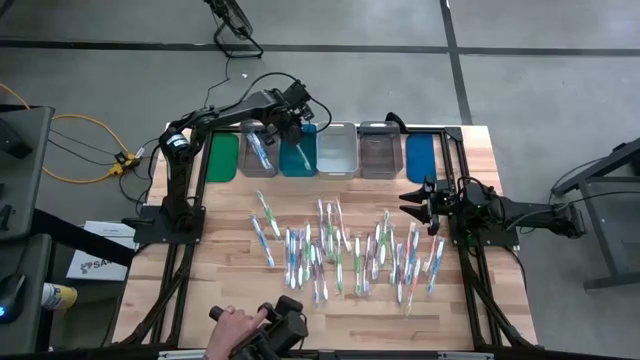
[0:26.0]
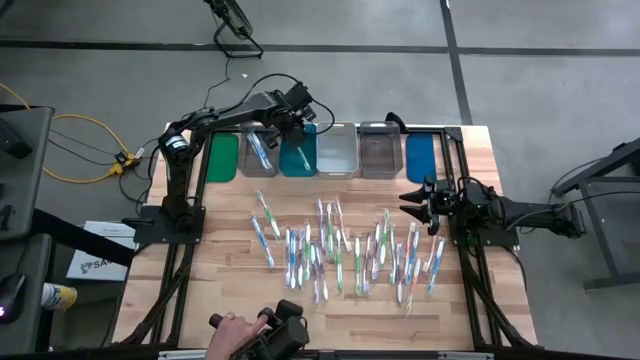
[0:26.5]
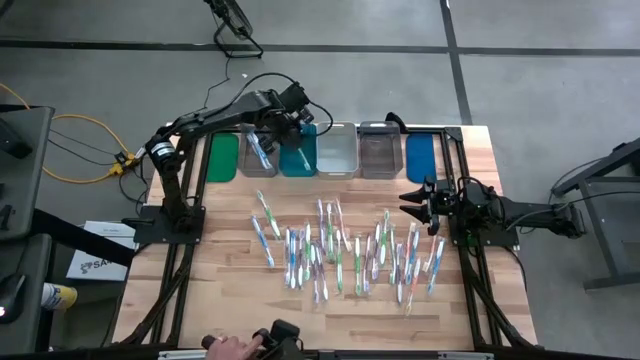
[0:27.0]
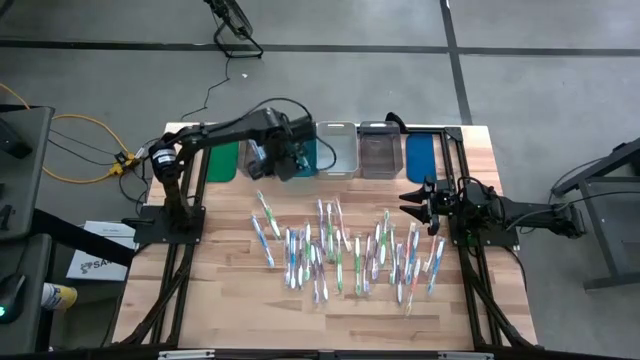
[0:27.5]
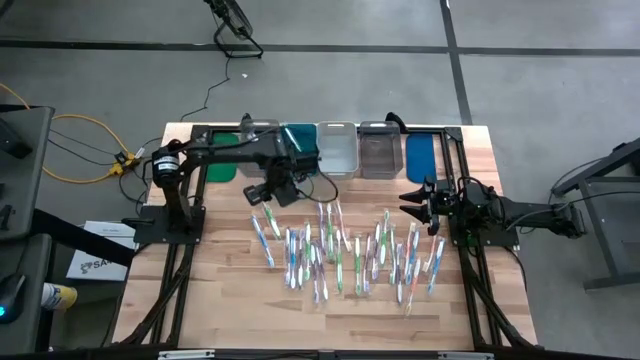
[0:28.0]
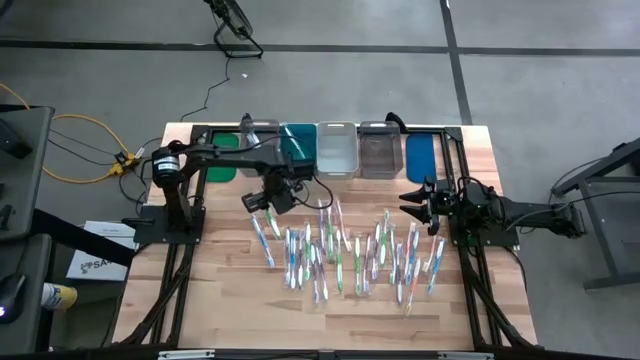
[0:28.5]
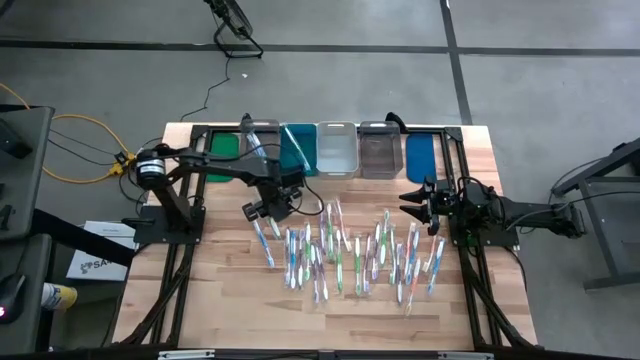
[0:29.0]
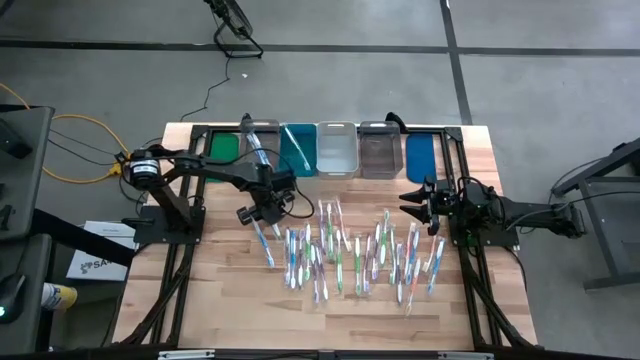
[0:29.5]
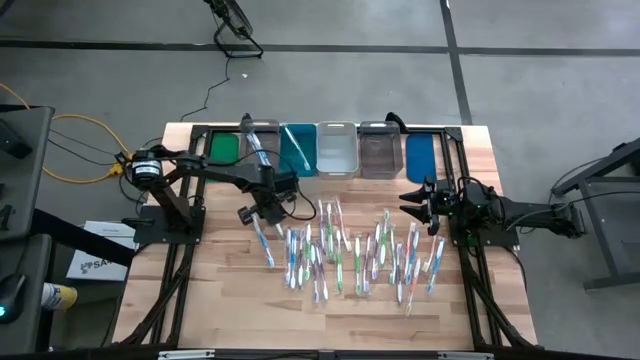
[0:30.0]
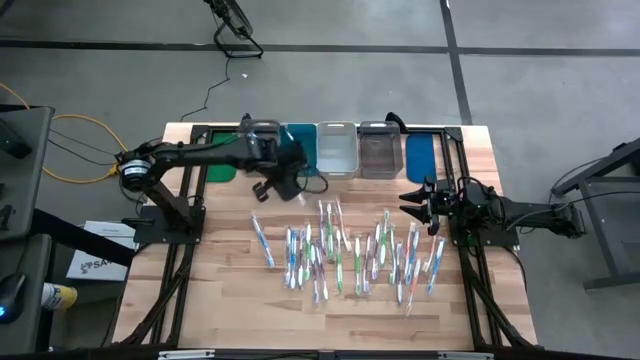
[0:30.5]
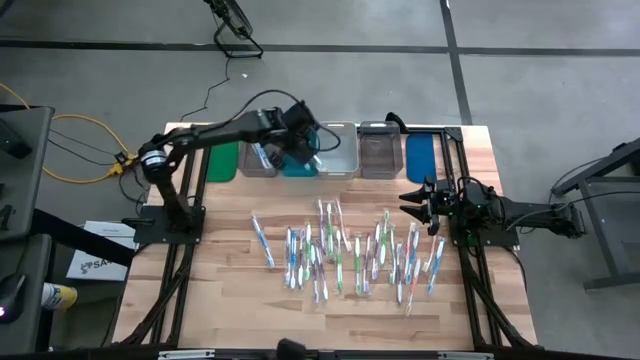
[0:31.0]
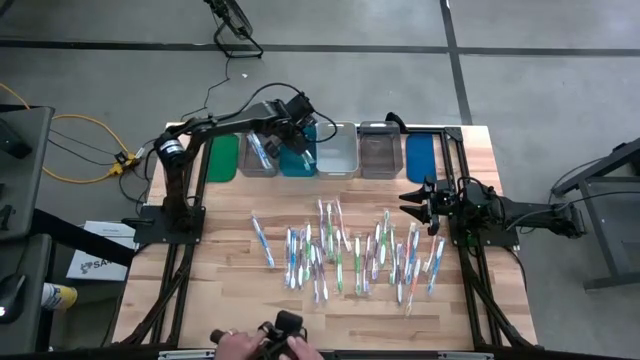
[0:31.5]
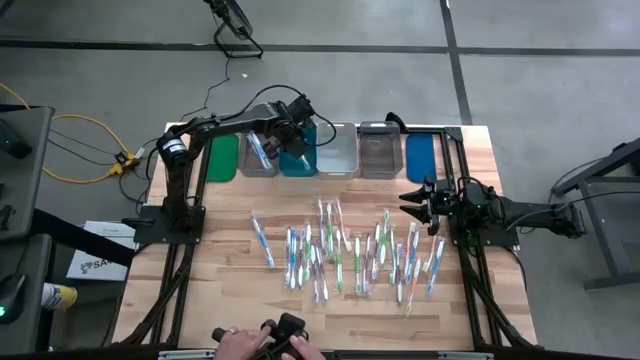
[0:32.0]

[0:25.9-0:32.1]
Task: Pick & Place Toothbrushes
Put the green toothbrush into the blue bin

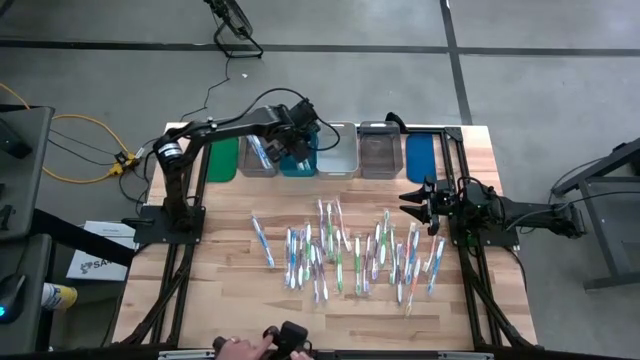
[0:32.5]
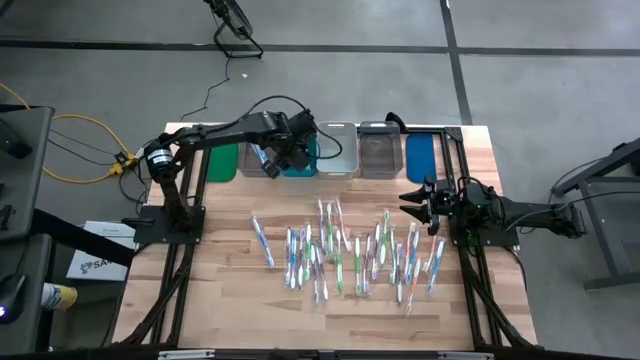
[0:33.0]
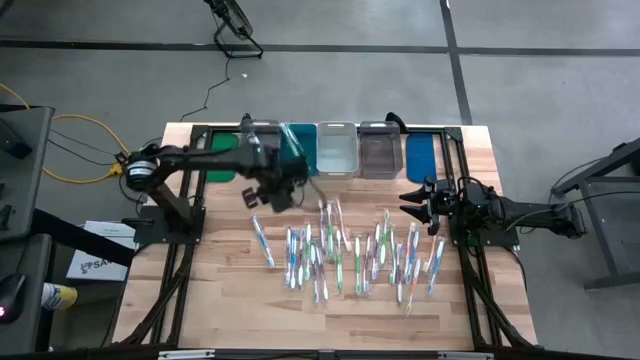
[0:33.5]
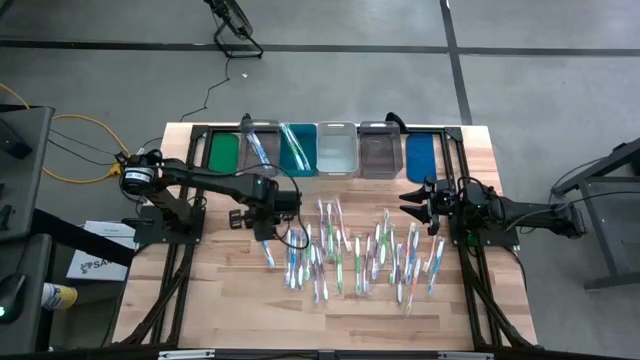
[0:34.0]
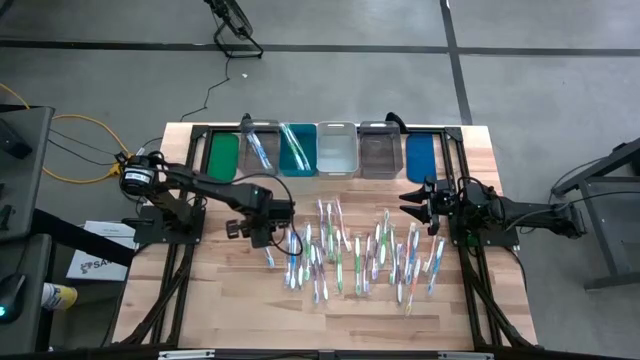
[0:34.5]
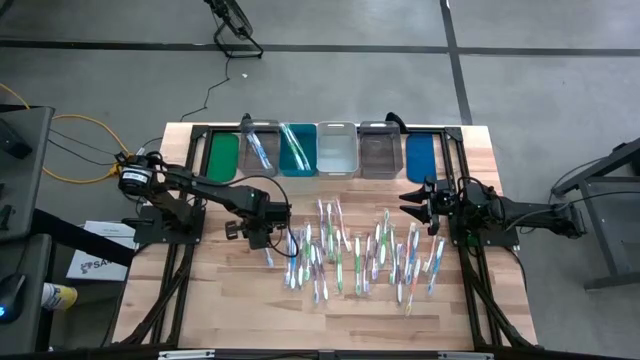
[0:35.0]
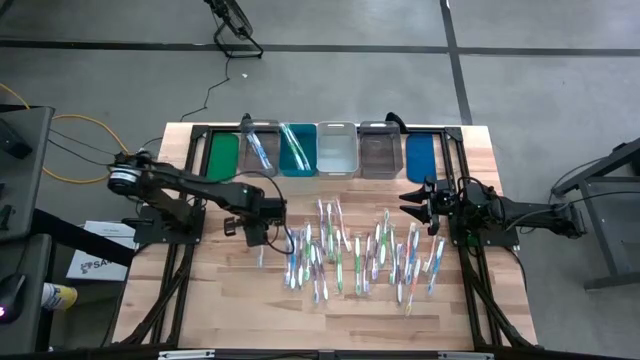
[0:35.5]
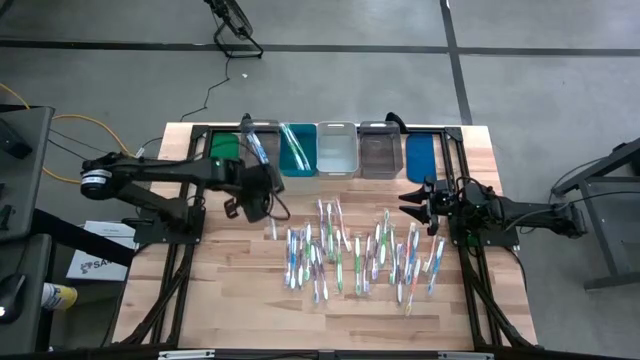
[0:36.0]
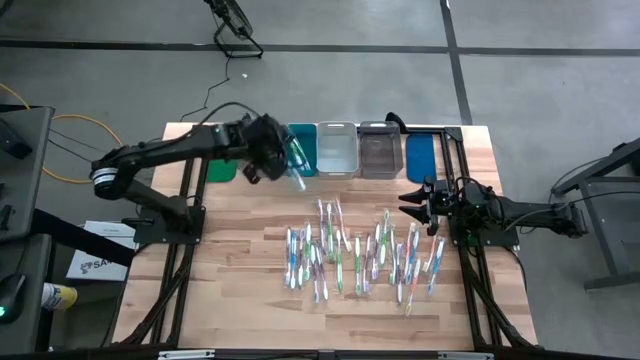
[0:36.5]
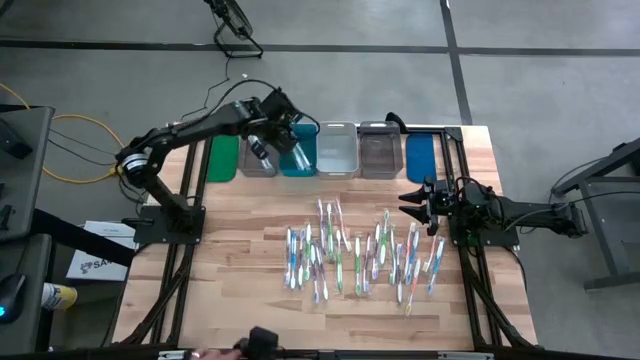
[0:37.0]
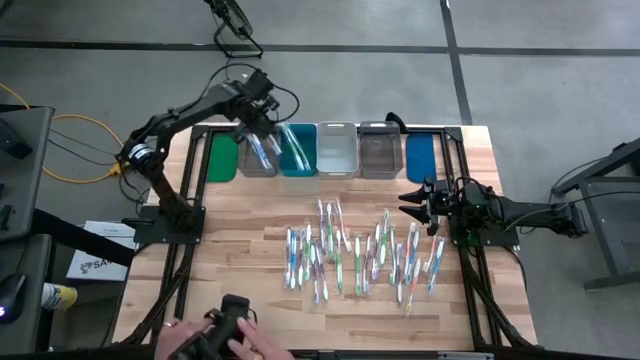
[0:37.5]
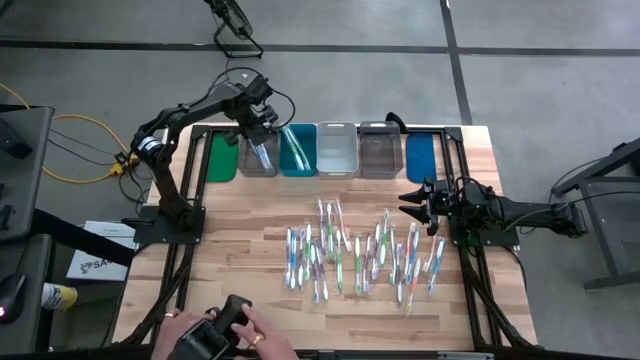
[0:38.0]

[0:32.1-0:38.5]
Put the blue toothbrush into the left black bin

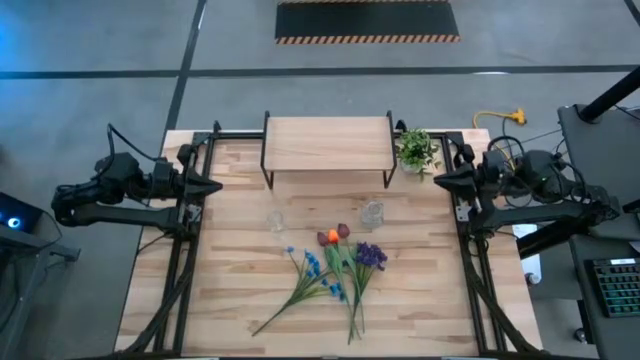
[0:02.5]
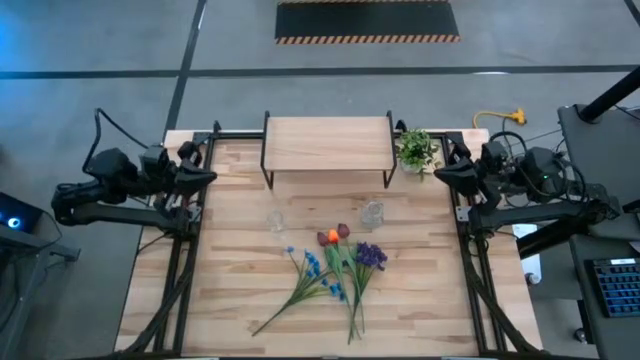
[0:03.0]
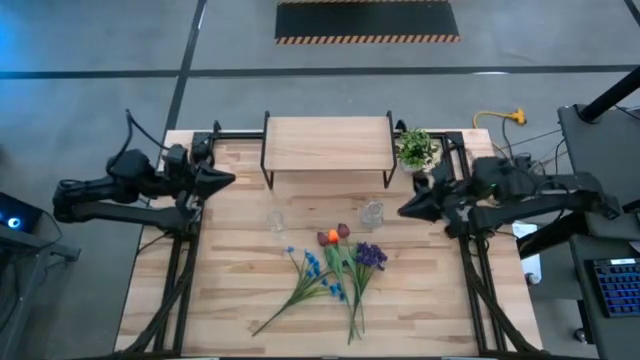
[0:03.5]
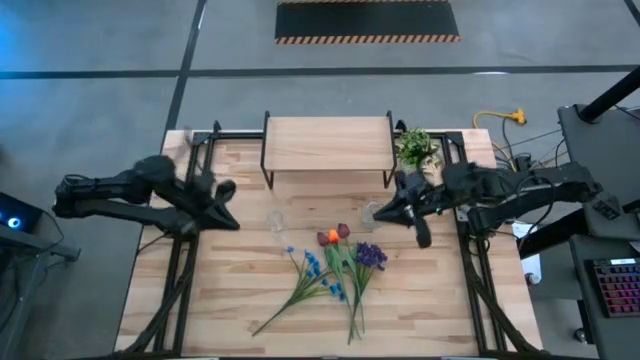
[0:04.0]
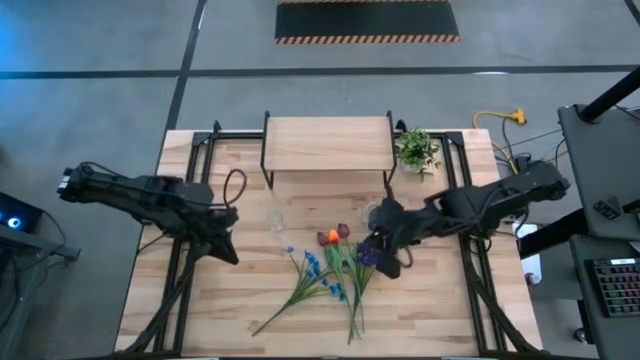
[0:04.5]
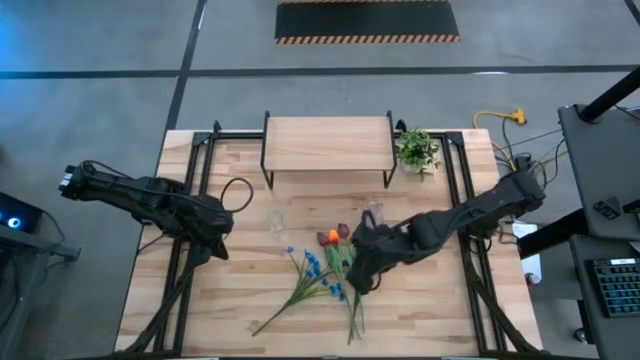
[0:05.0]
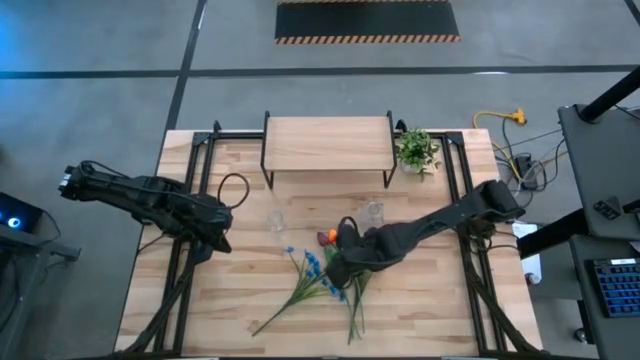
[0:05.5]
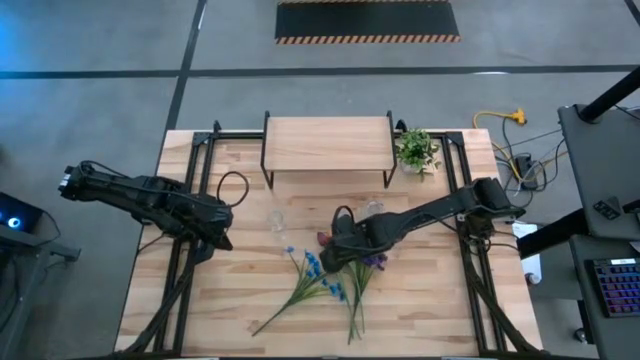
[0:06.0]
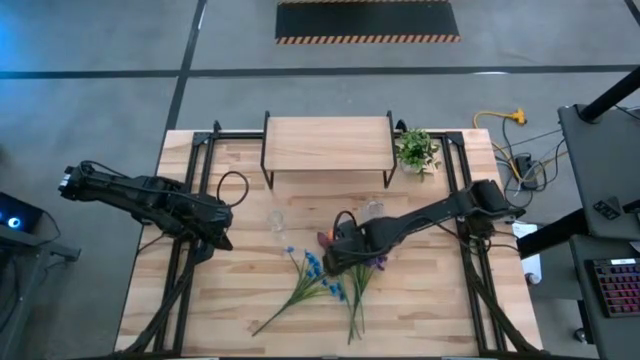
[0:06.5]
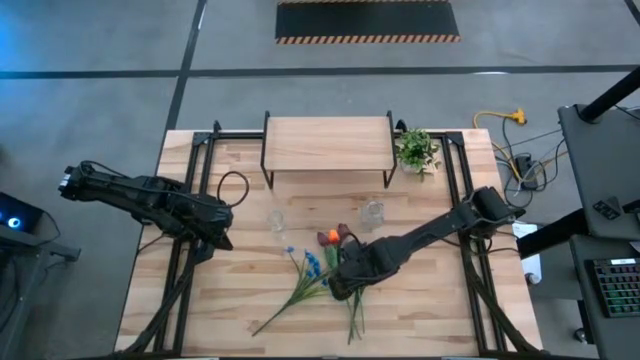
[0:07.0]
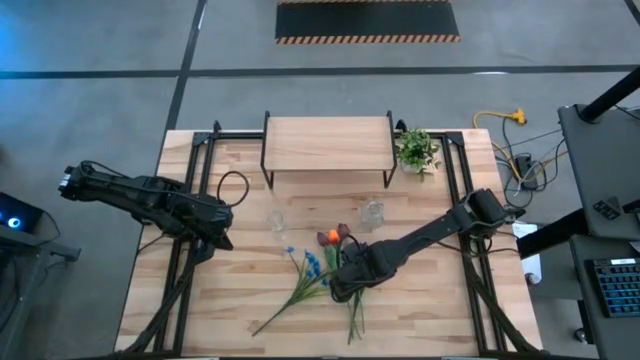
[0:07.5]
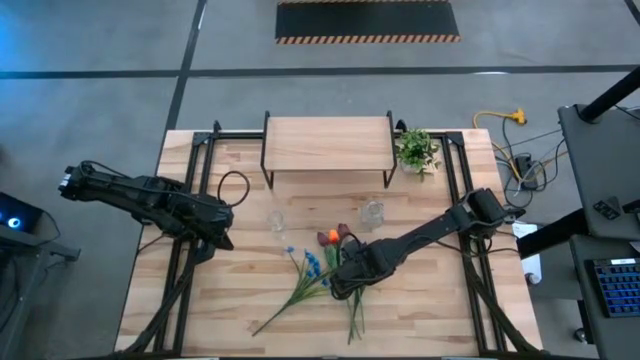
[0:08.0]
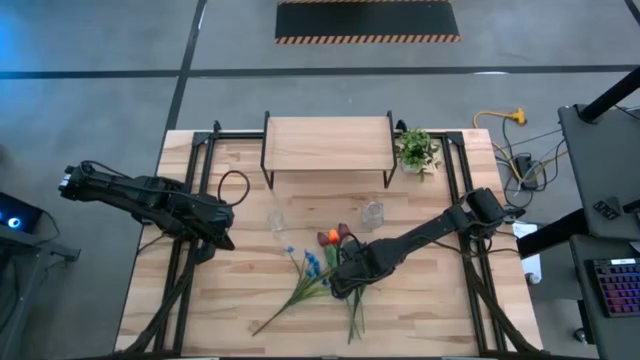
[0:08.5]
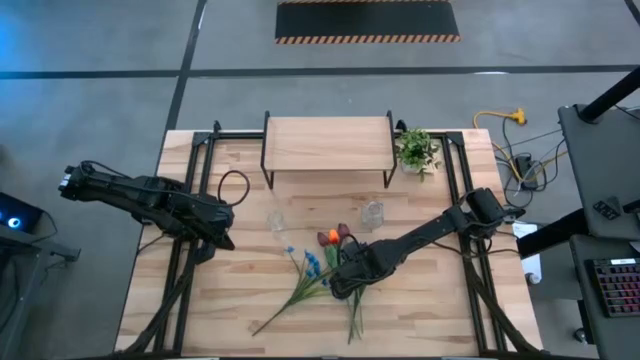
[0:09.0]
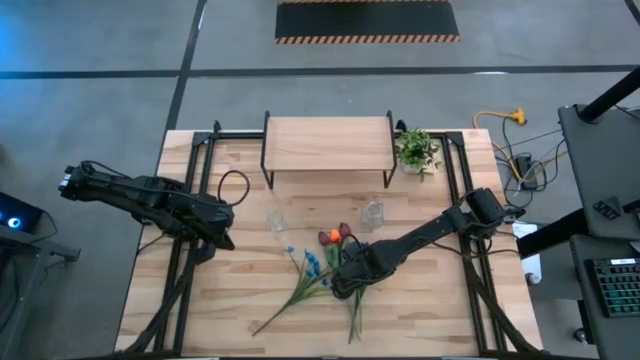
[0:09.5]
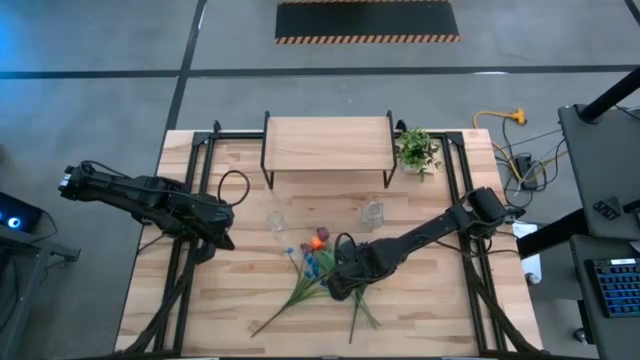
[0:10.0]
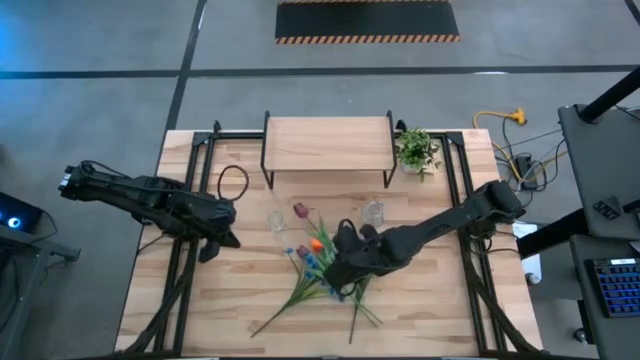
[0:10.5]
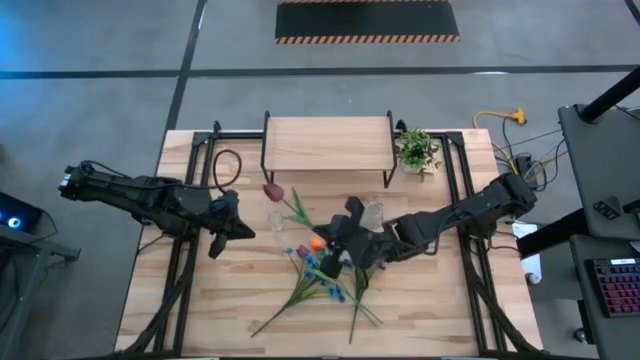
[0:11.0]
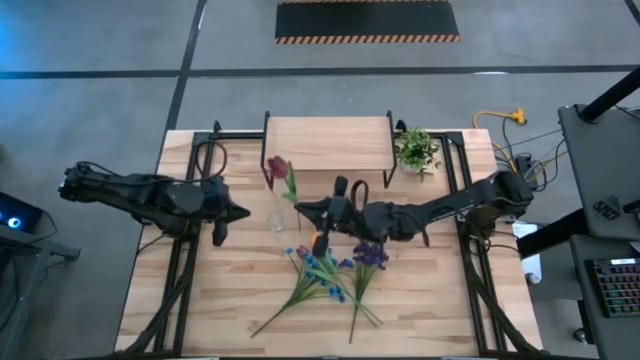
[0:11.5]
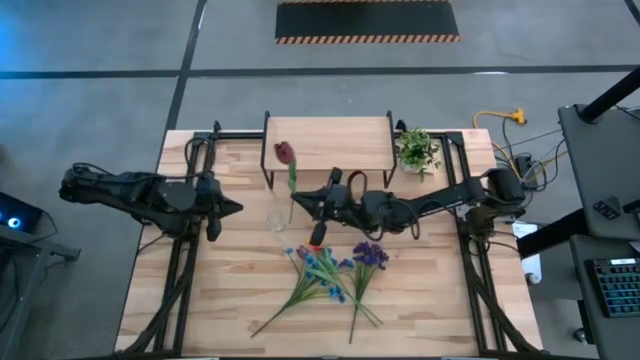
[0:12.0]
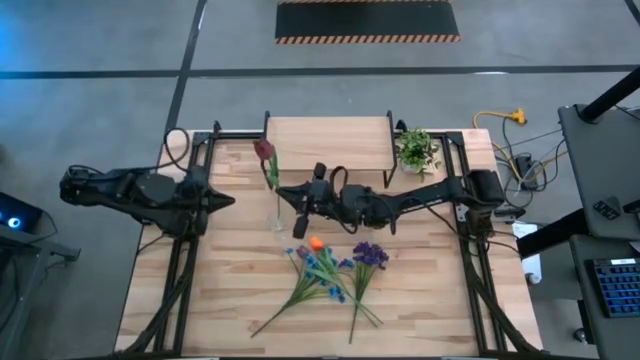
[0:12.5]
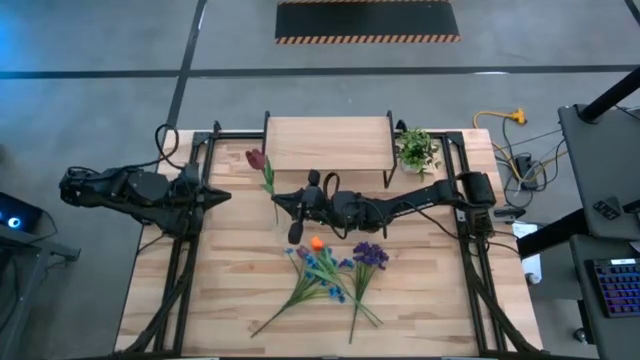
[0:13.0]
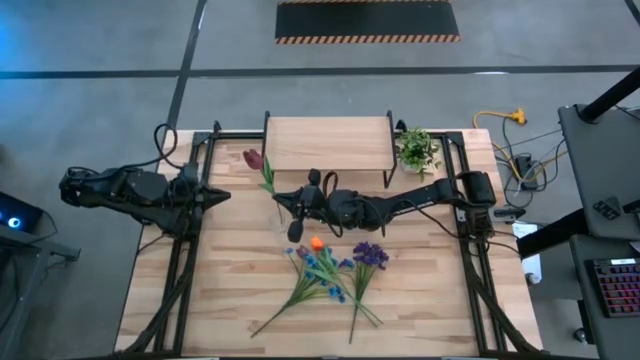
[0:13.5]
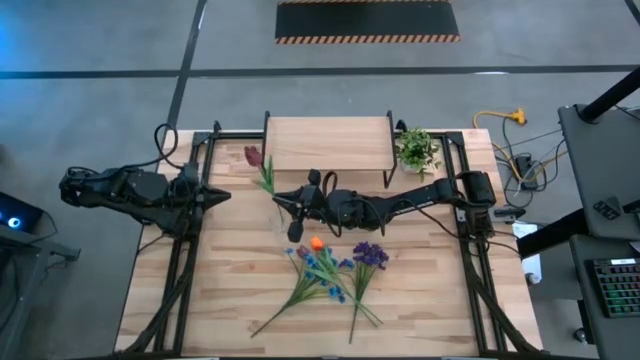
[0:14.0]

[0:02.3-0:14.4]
Task: Pick and place flowers into a vace then onto a shelf
Put the right red tulip into the left transparent vase
